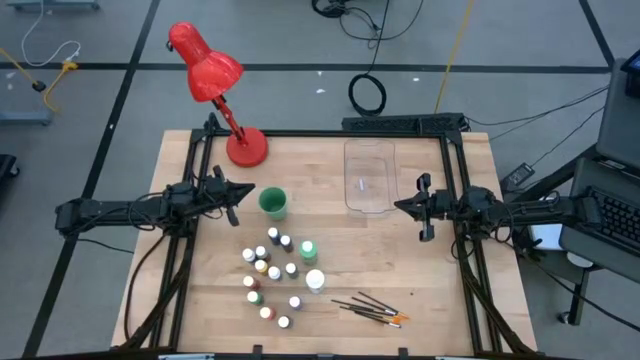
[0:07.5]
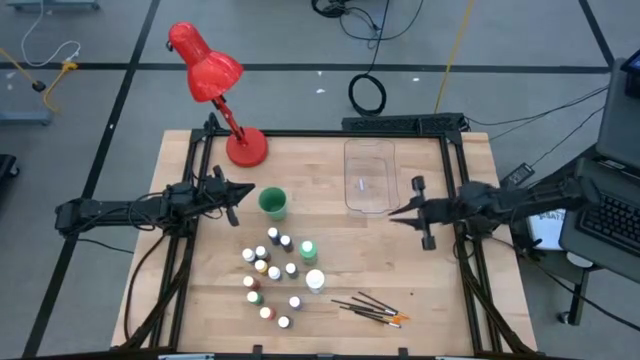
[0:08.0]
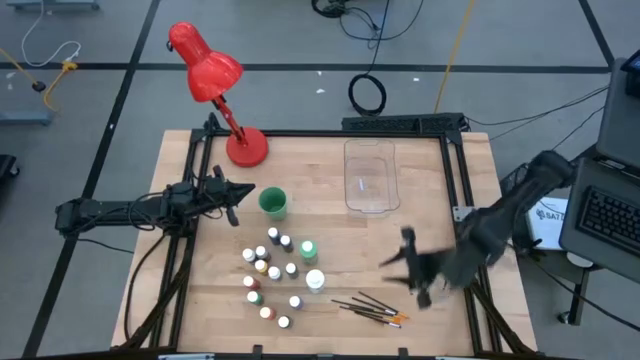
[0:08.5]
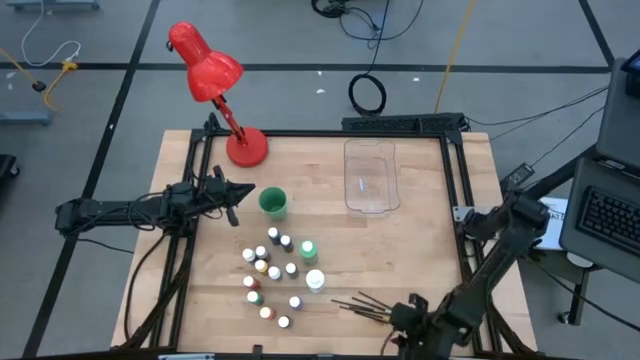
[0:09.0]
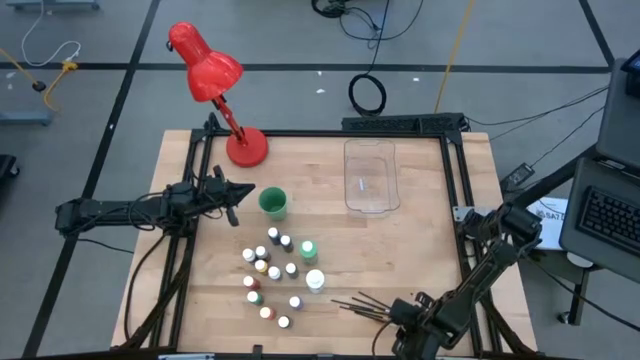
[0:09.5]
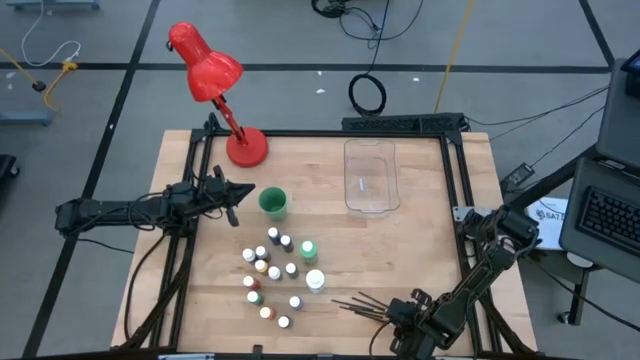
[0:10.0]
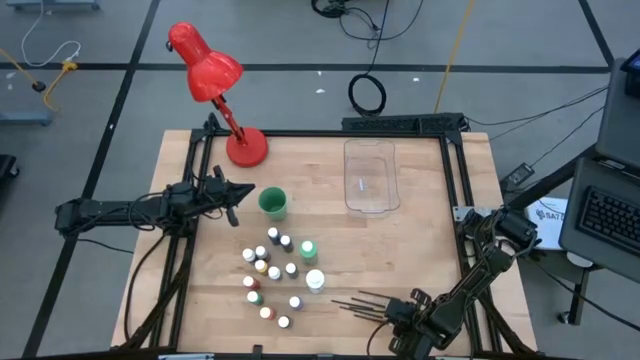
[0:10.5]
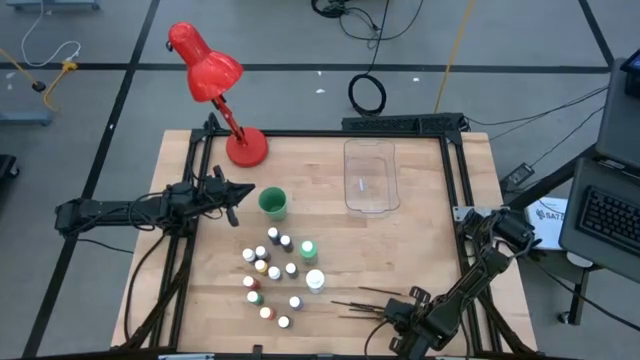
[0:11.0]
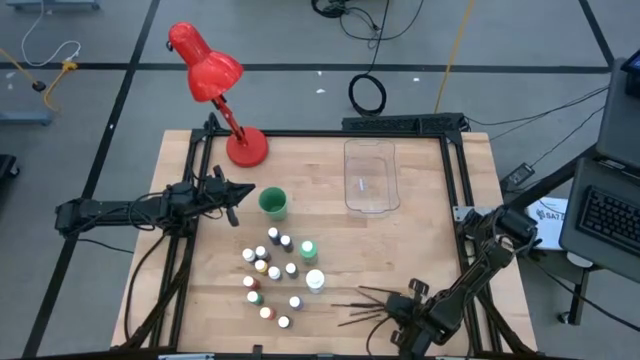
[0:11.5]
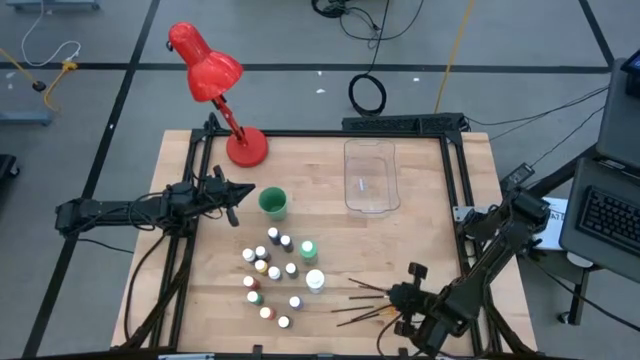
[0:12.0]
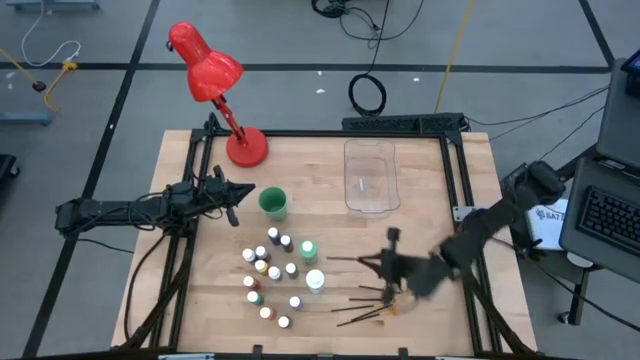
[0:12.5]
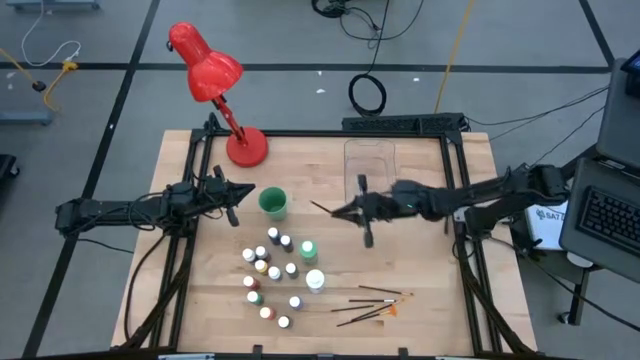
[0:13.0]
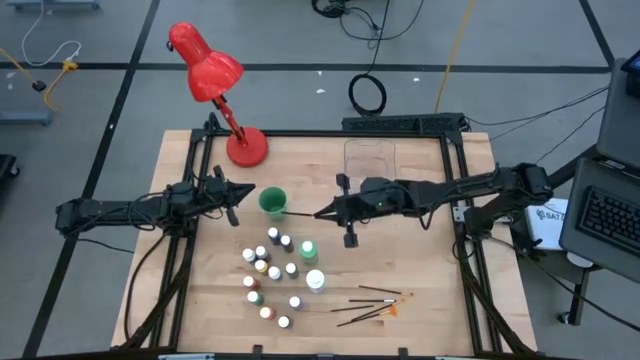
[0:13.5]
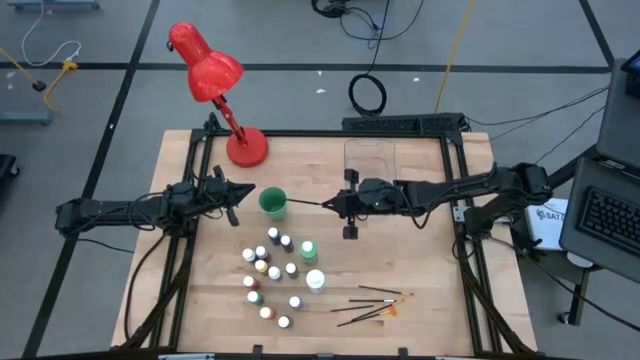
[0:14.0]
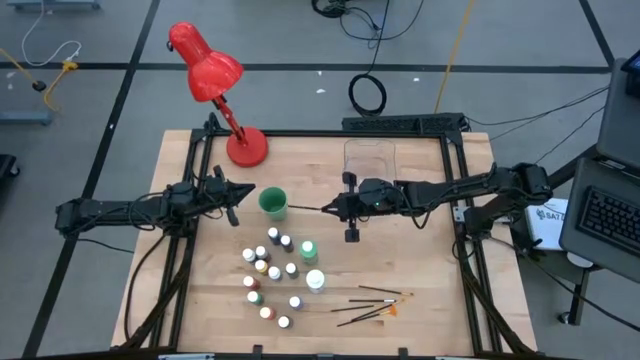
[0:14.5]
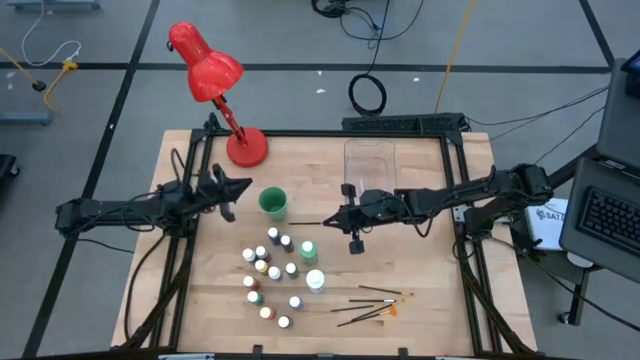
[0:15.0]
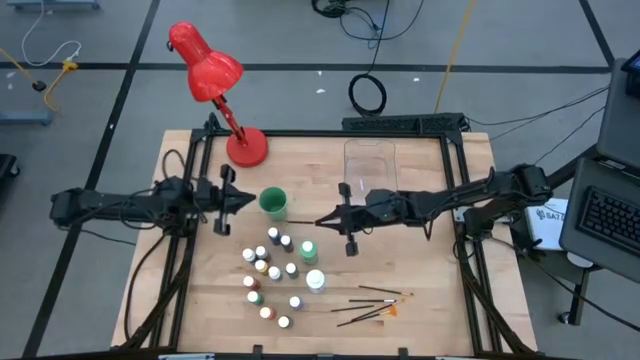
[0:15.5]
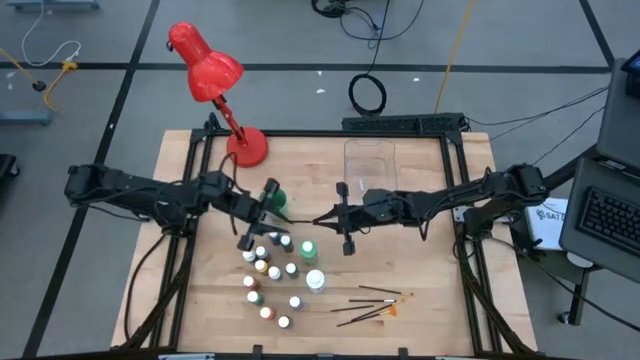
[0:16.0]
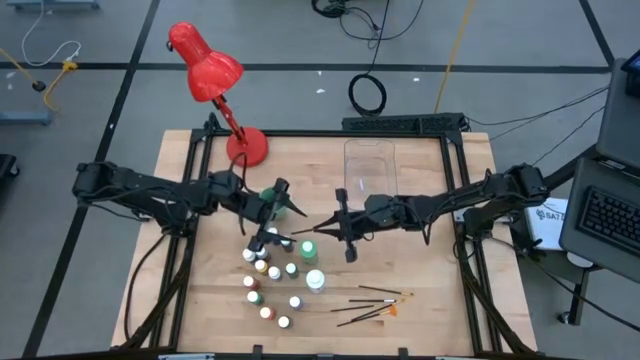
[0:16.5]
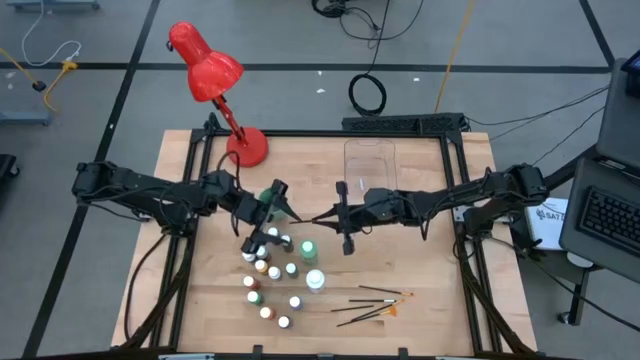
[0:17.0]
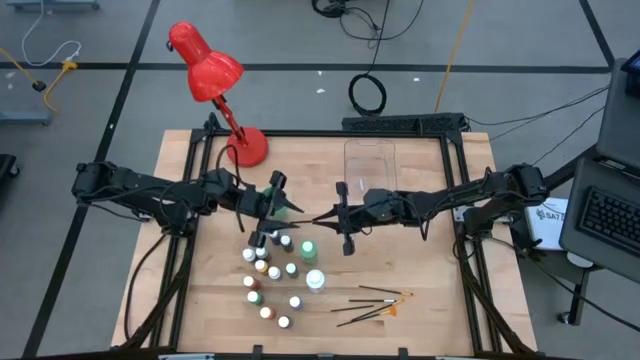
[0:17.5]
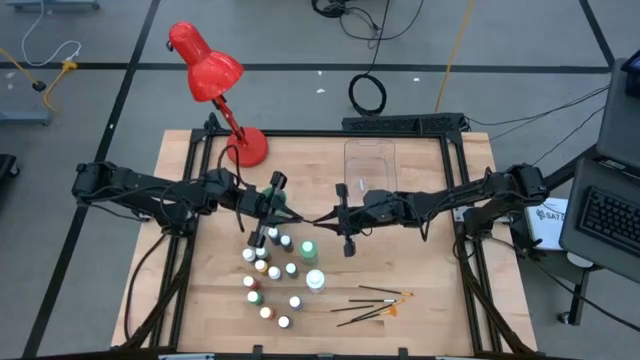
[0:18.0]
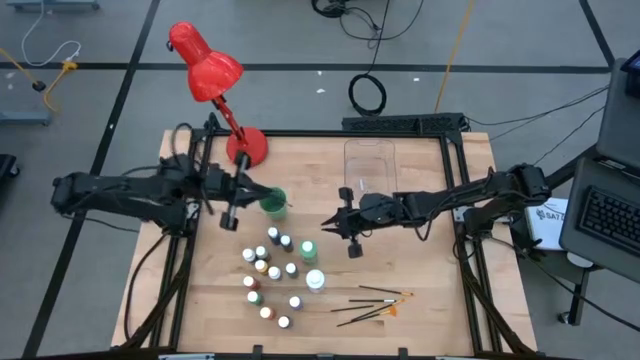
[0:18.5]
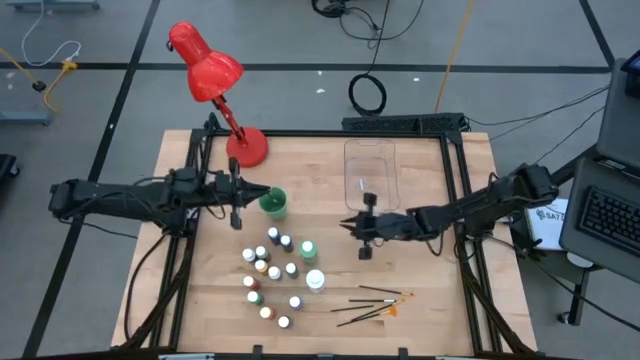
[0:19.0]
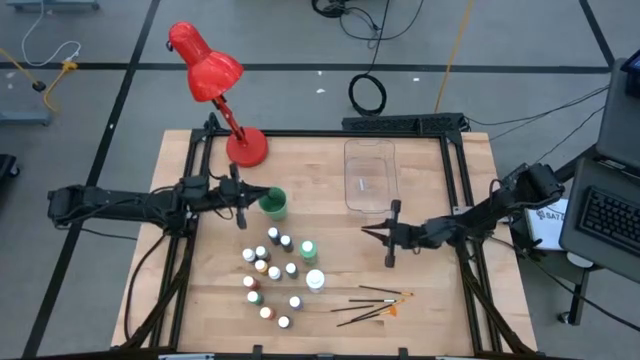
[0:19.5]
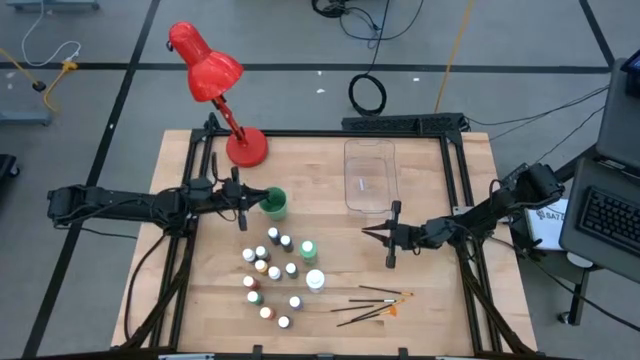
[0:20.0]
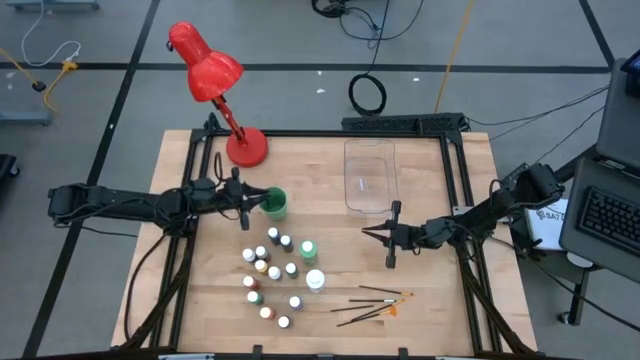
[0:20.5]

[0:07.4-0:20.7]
Task: Pick & Place Paint Supplies
Put the silver paintbrush into the green cup

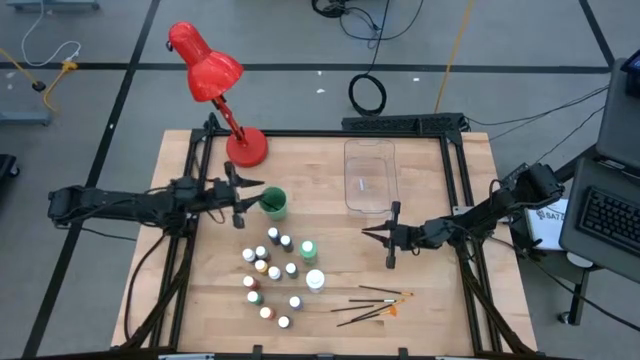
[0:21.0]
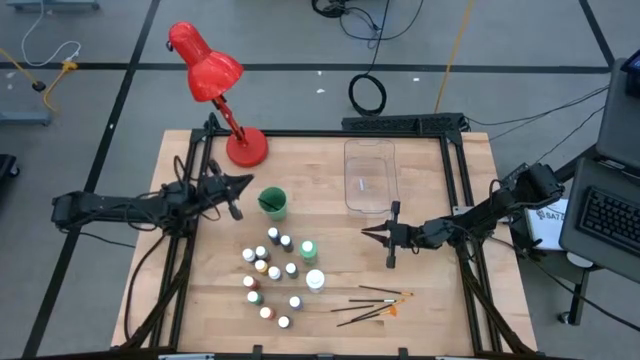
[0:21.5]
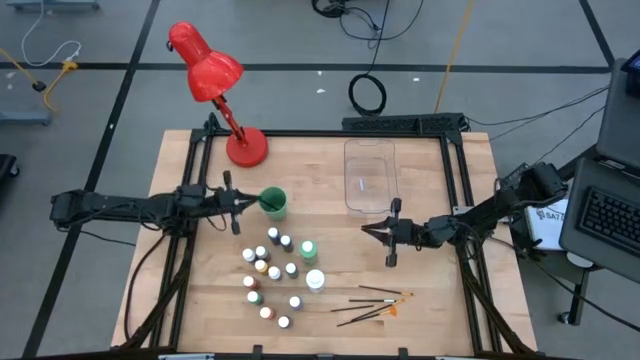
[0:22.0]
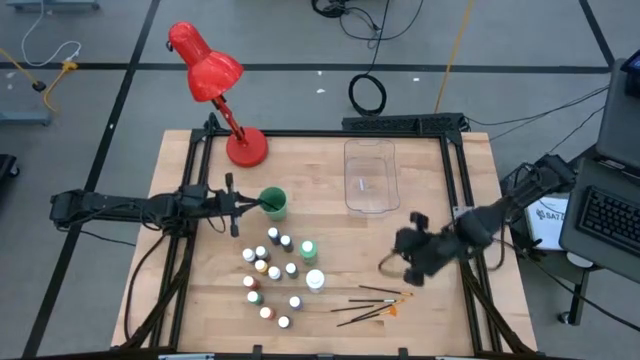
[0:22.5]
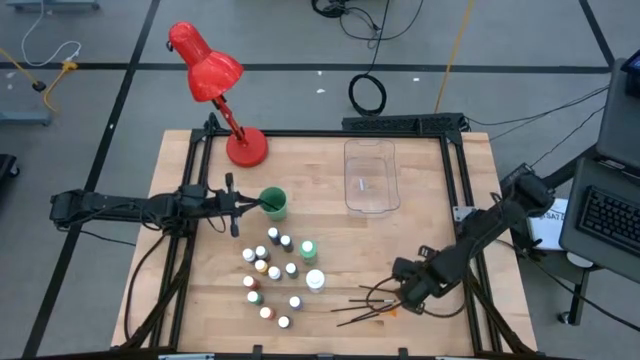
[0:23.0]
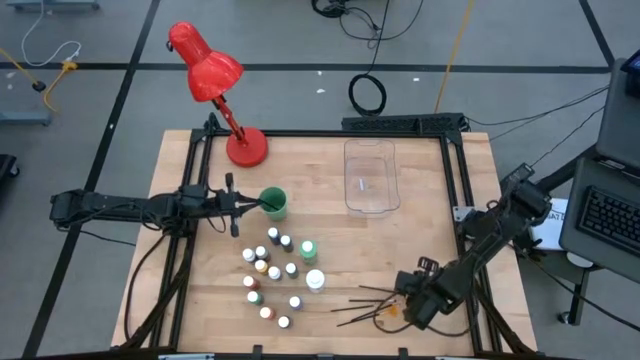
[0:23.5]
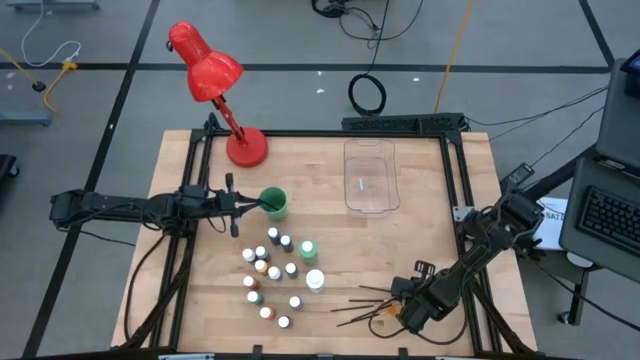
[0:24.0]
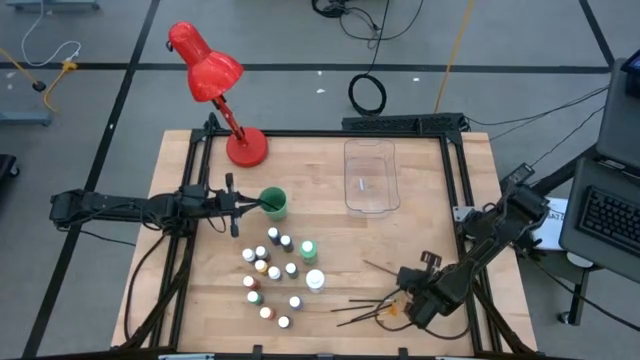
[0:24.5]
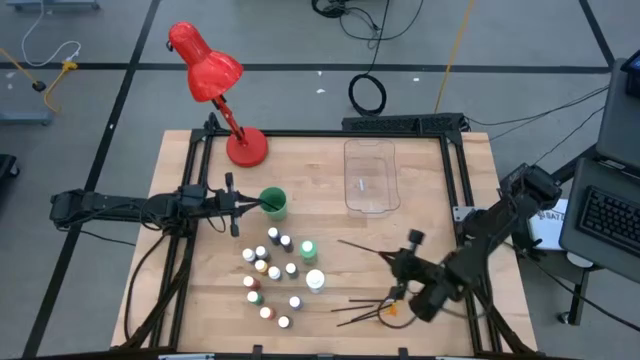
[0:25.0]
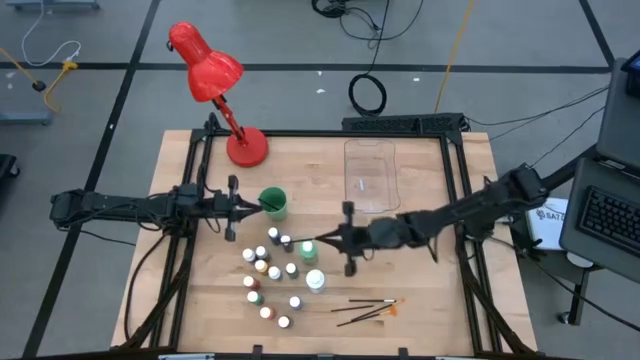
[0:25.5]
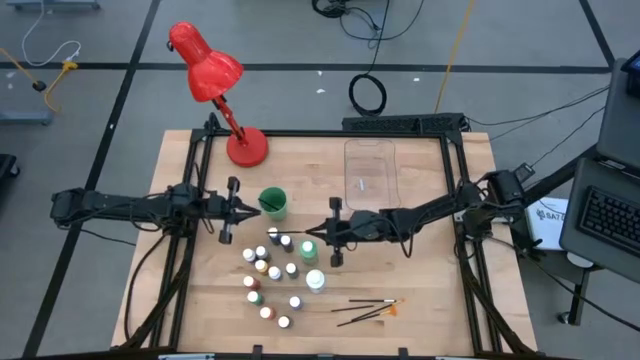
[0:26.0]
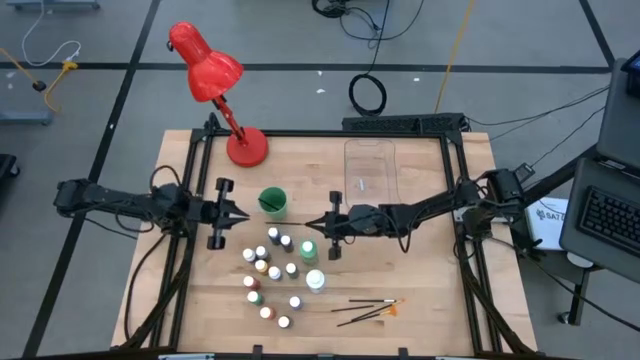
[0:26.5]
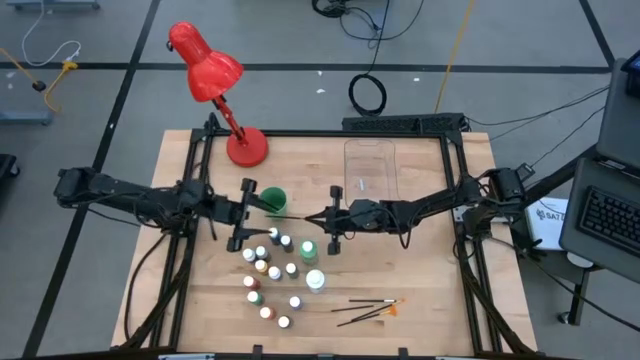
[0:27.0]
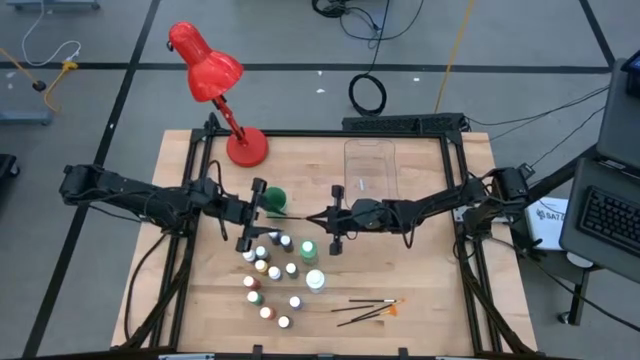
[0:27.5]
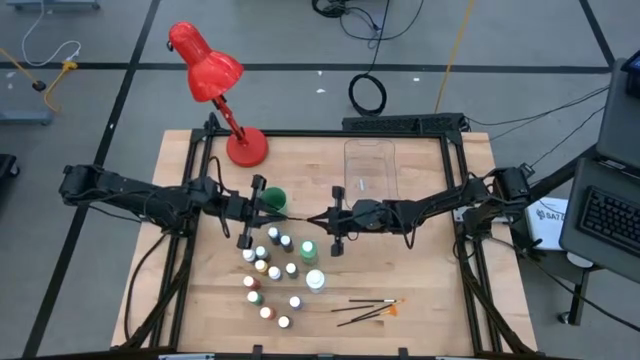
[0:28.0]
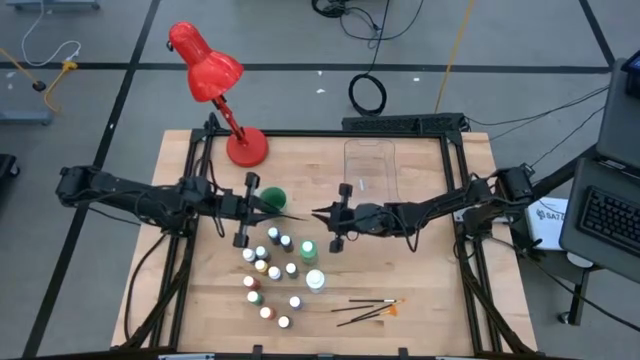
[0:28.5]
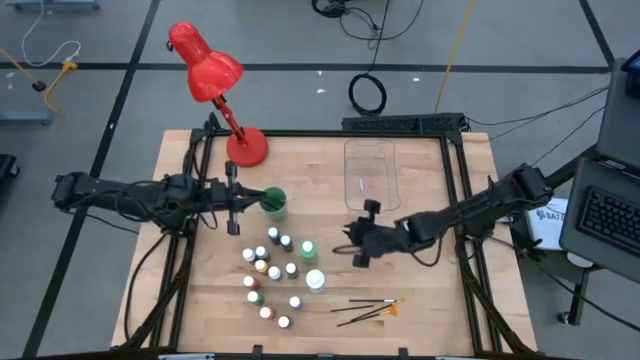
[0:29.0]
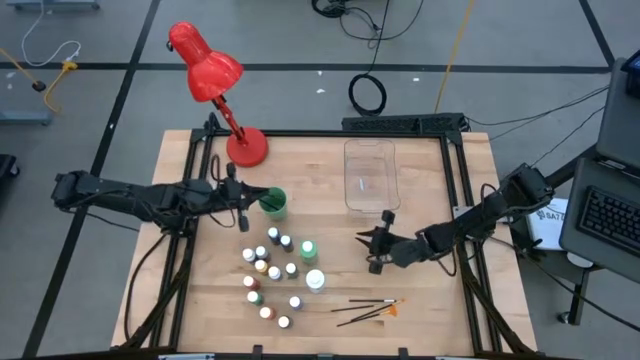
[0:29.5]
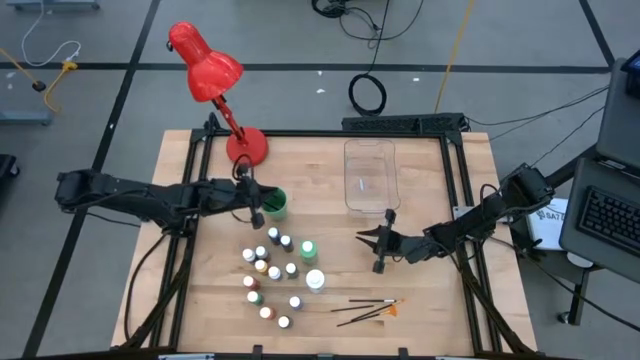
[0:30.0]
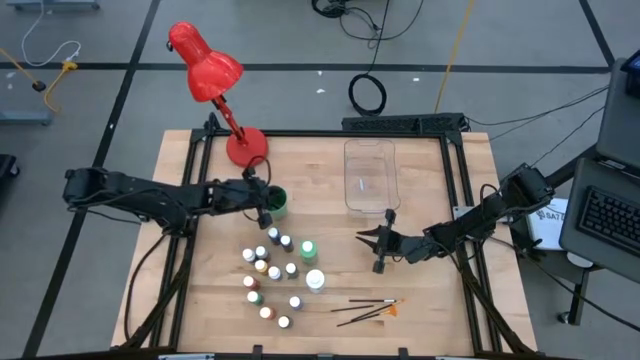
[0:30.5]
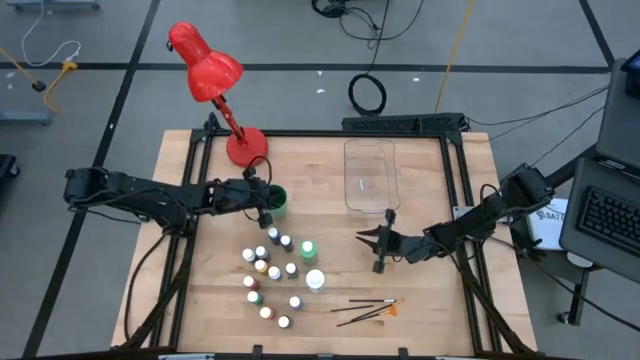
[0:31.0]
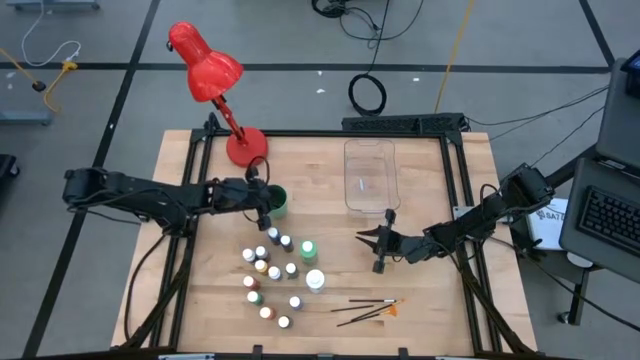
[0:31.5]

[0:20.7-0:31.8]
Put the gold paintbrush into the green cup
